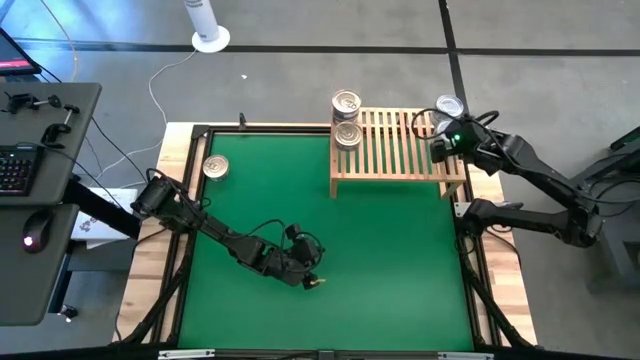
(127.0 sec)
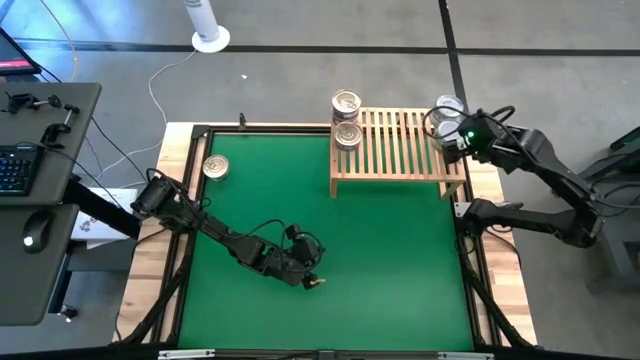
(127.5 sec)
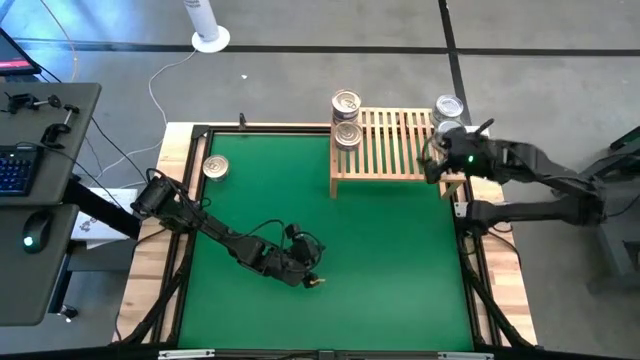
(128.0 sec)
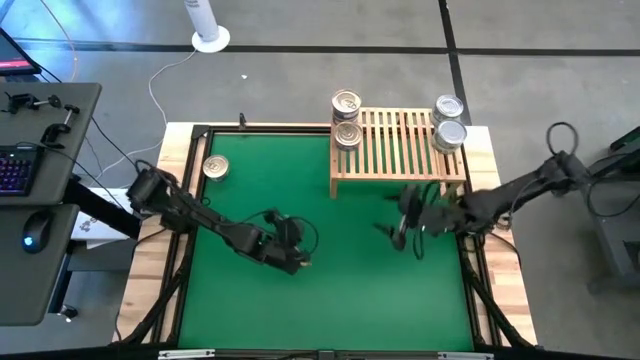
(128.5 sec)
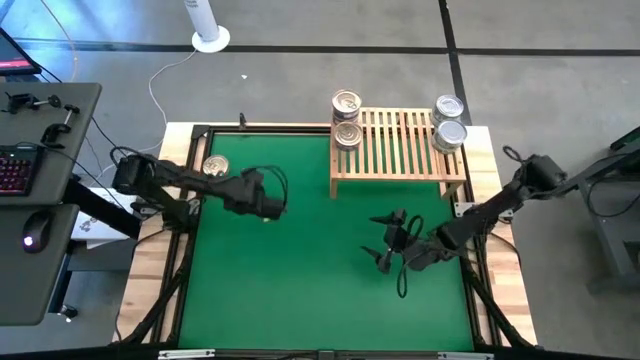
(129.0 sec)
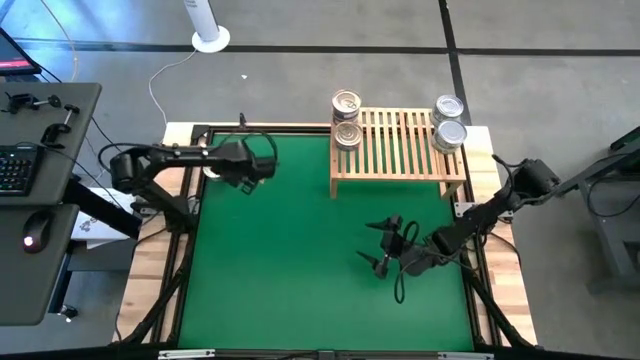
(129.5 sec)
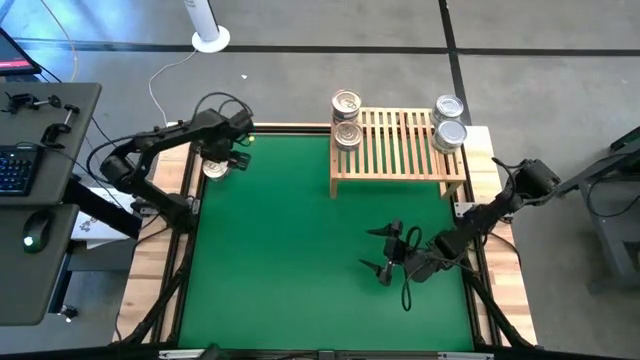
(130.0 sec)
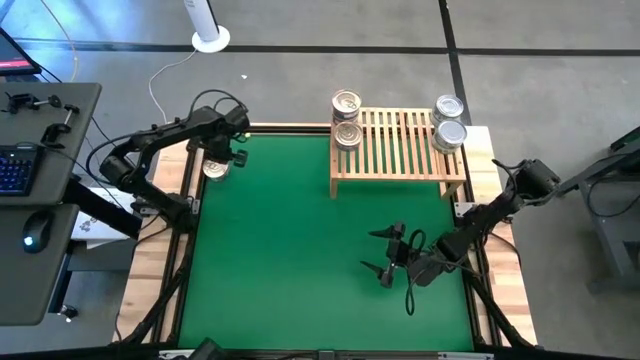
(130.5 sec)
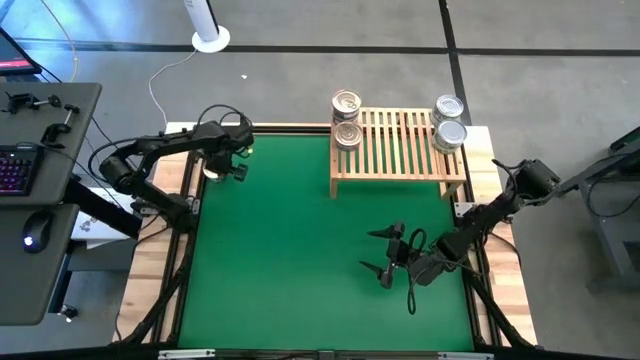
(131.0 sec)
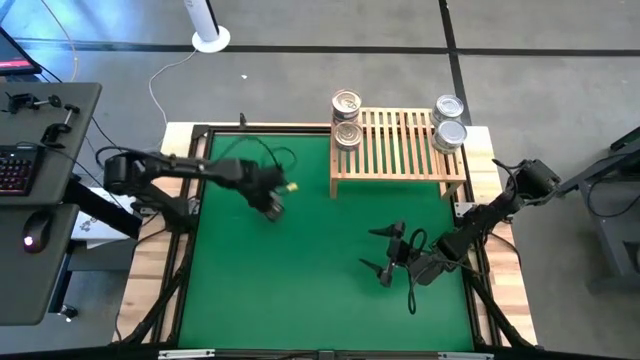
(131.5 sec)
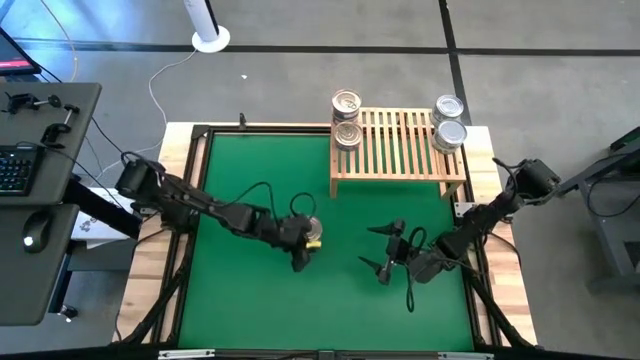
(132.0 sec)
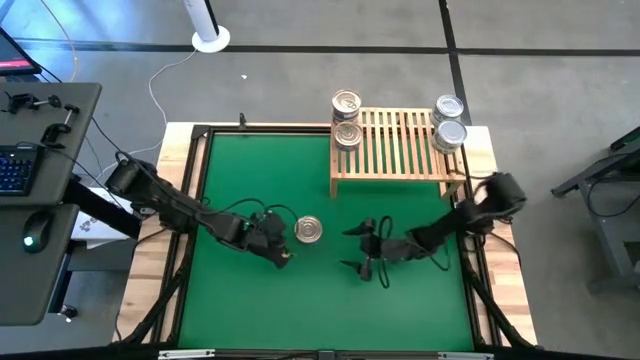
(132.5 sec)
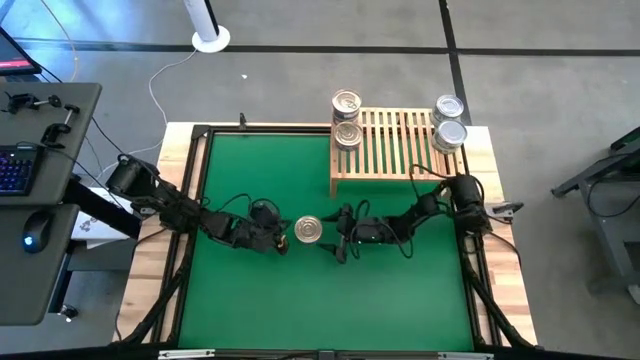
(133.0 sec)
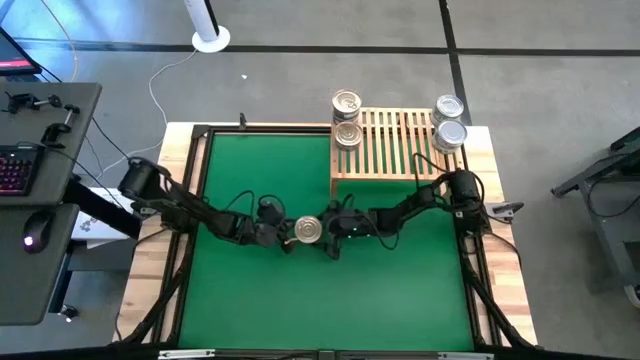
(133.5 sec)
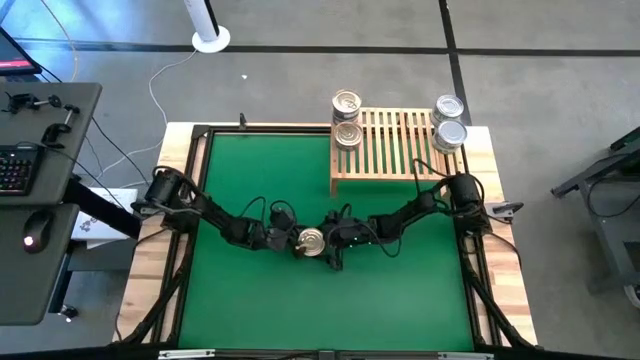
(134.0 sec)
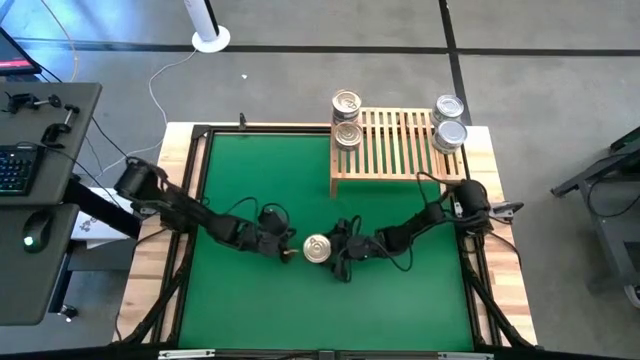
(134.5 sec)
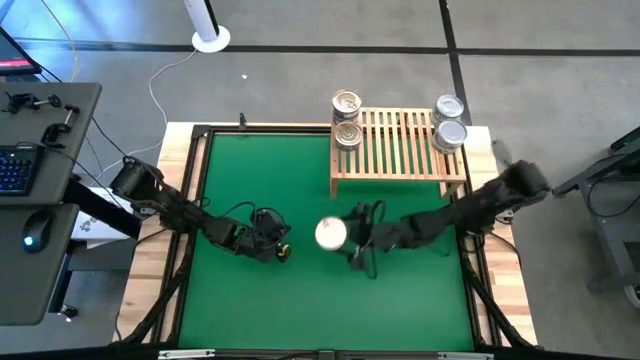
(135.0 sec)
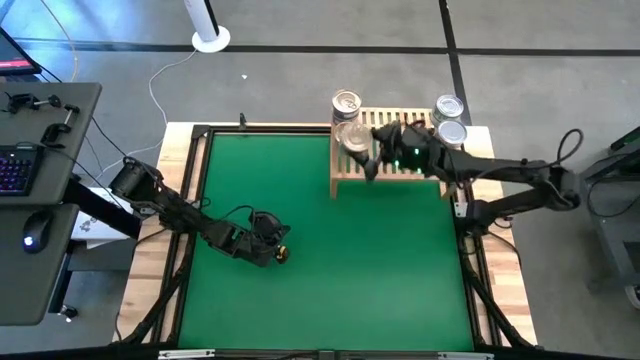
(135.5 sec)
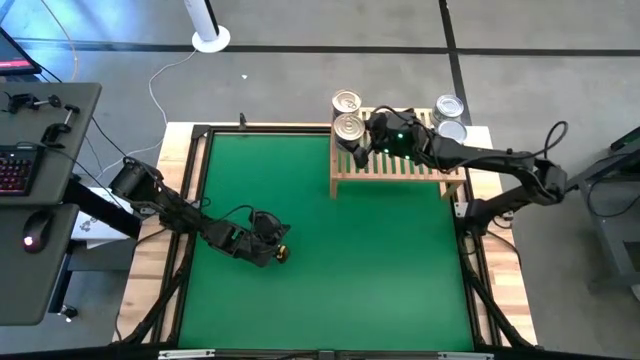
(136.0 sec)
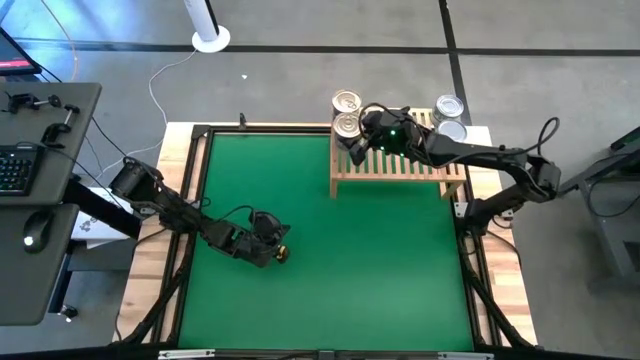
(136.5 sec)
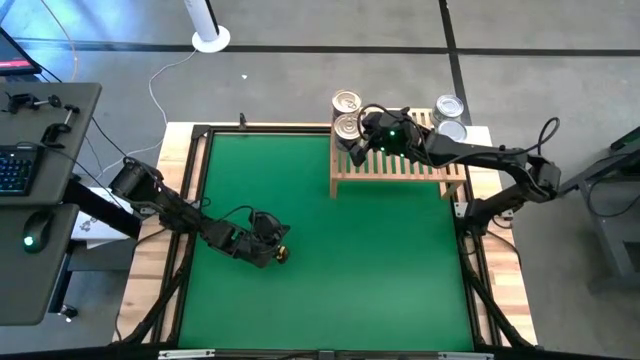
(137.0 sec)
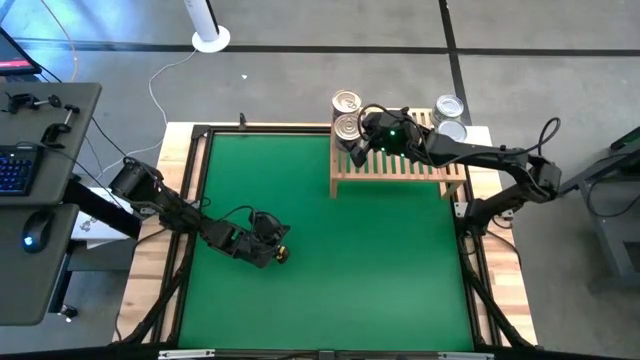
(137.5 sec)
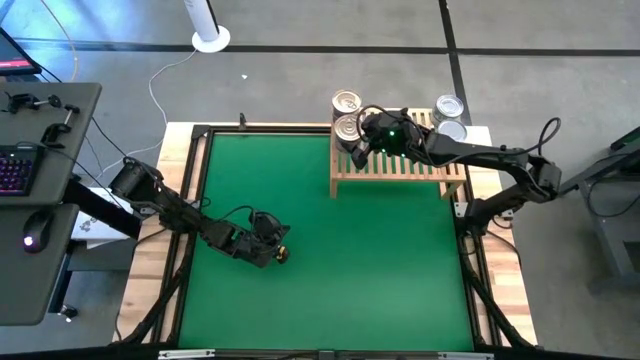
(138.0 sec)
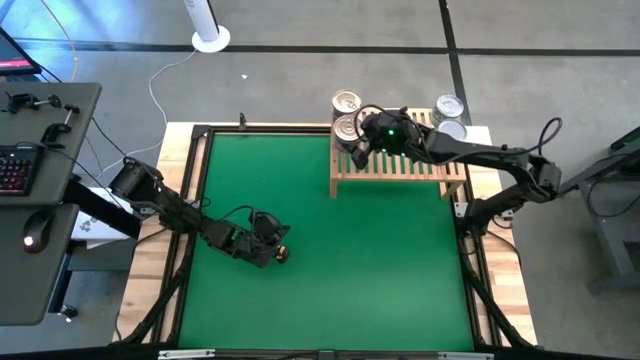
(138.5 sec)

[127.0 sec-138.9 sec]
Task: Stack canned seafood by type on shelf
Stack the blue pink tuna can on top of the blue pink tuna can on the shelf

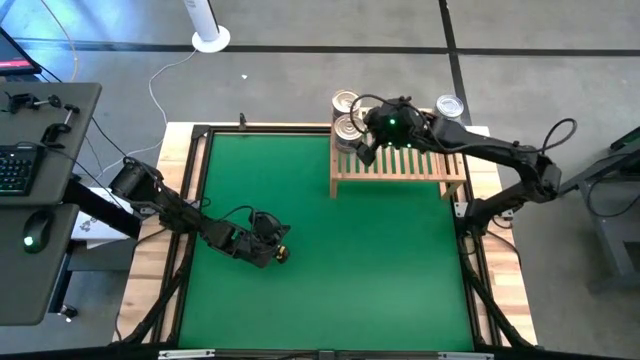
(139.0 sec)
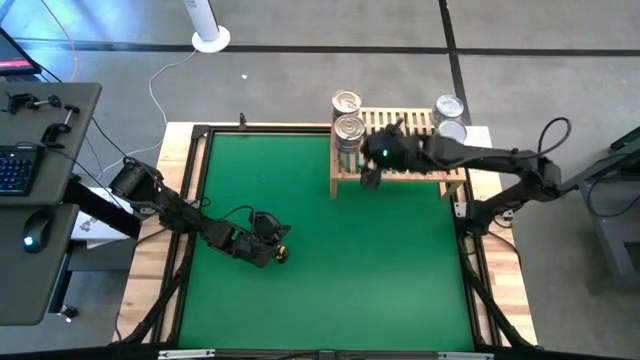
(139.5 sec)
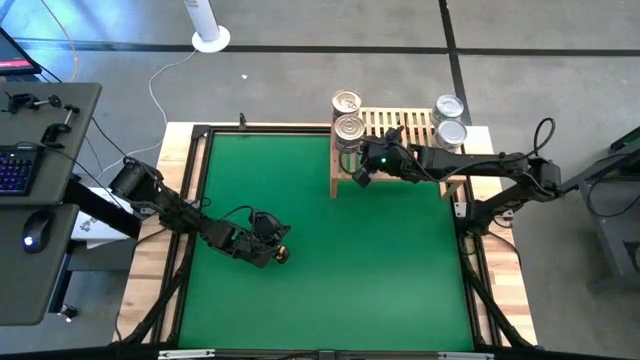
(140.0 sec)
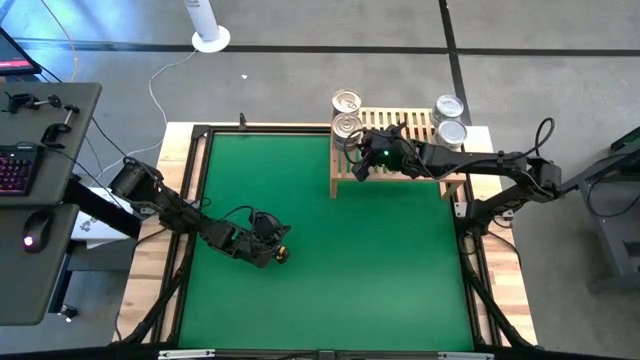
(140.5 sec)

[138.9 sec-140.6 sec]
Adjust the stacked blue pink tuna cans on the shelf

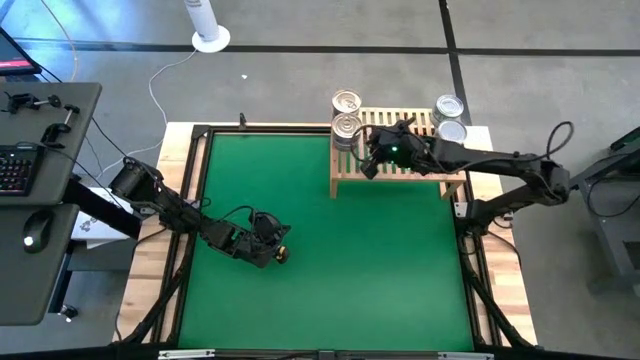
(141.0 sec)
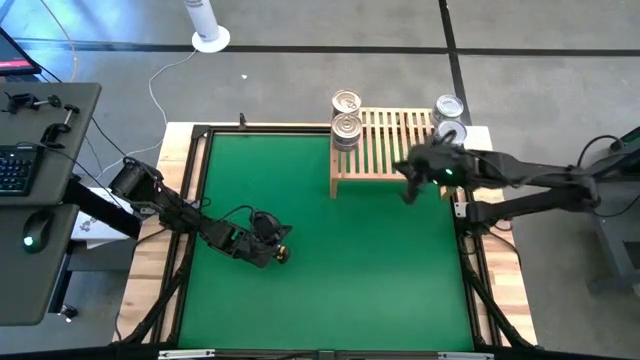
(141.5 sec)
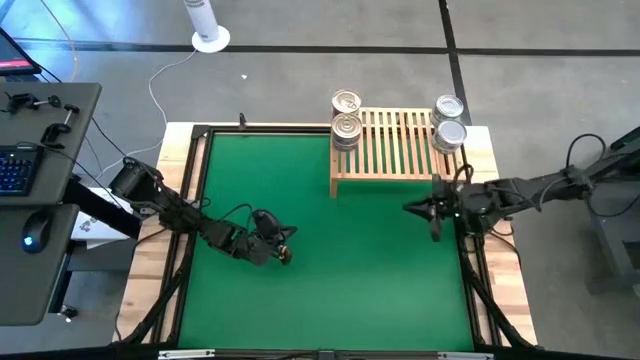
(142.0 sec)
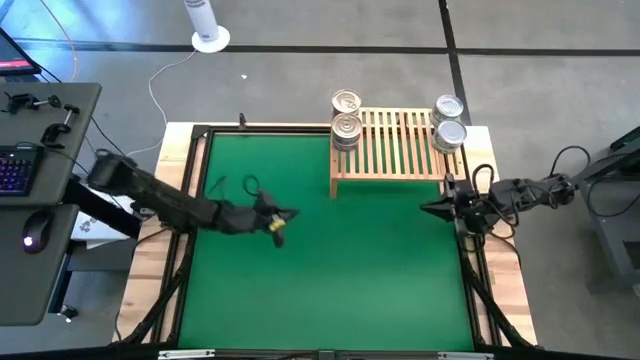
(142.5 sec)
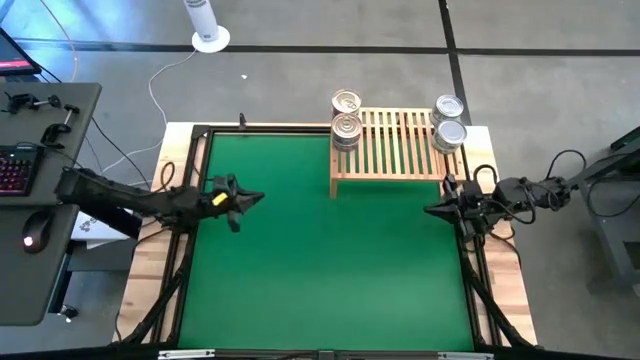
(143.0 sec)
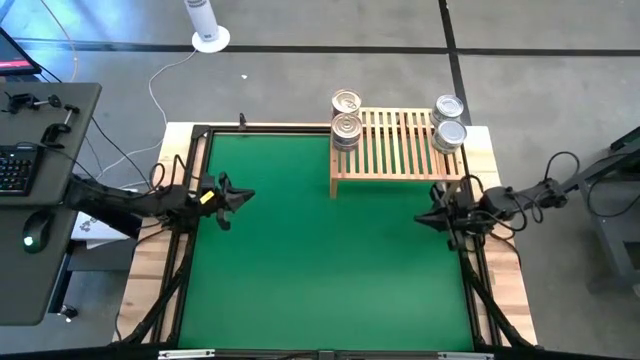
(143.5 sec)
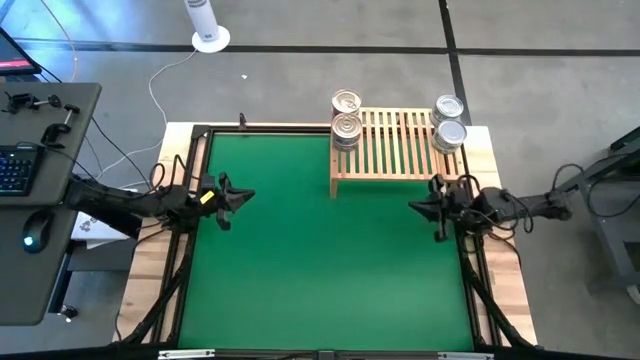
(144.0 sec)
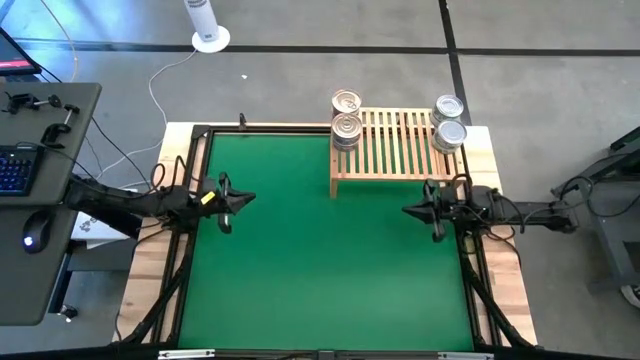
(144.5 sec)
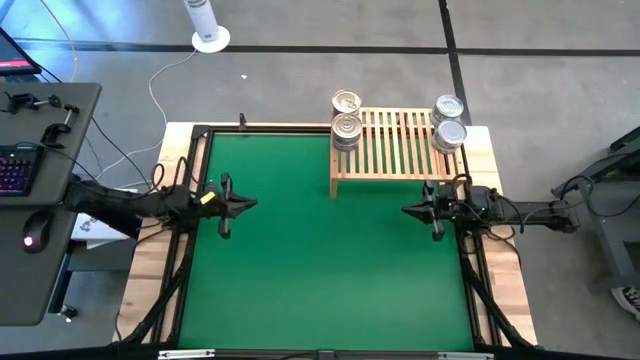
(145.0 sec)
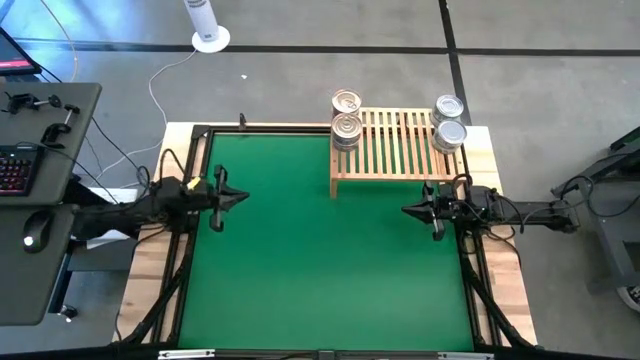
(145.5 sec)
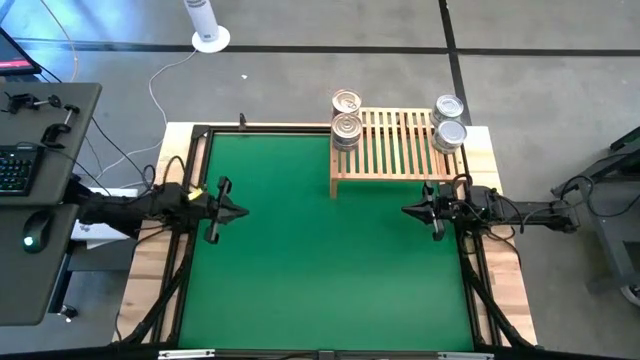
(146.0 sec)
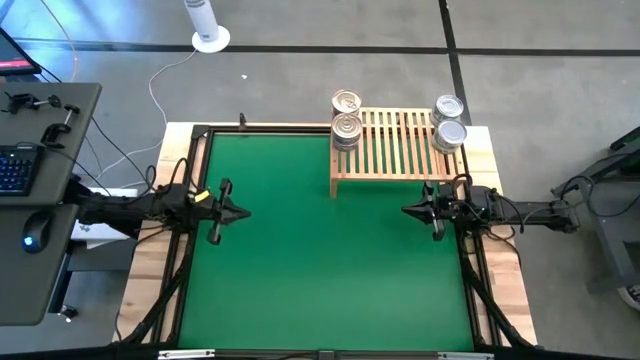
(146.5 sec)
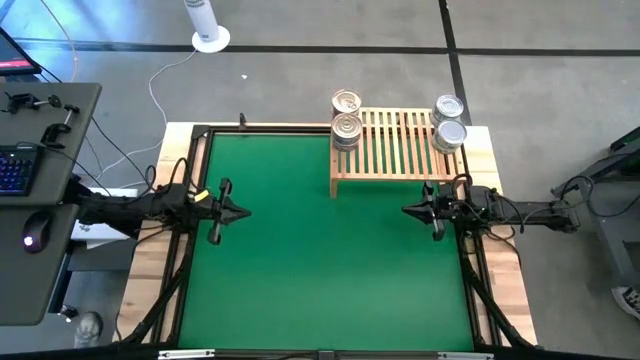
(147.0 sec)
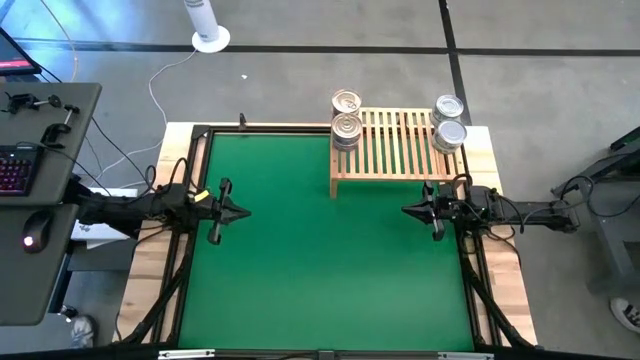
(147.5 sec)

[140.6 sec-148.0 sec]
Return to Home Position
